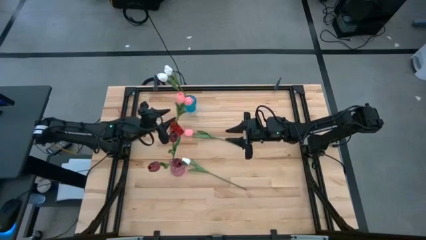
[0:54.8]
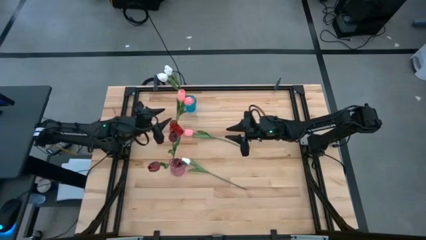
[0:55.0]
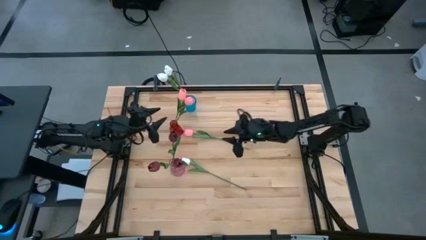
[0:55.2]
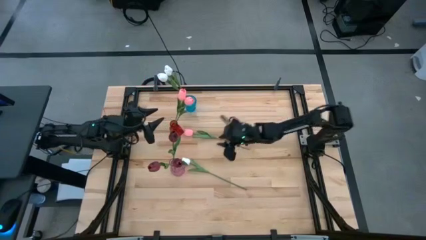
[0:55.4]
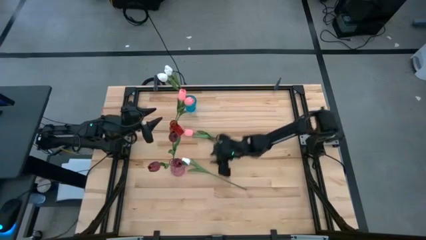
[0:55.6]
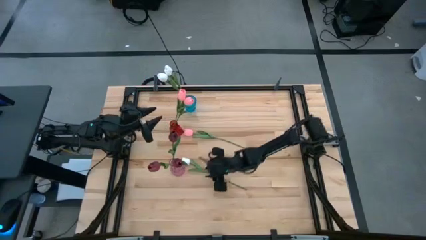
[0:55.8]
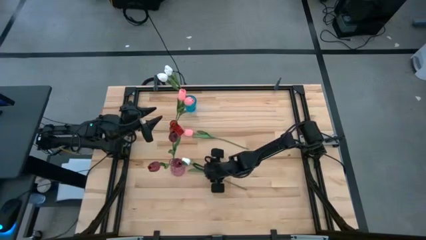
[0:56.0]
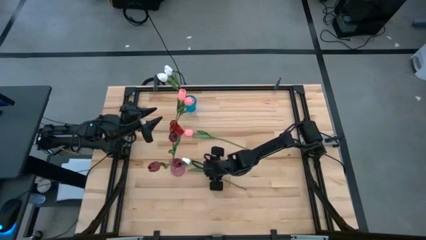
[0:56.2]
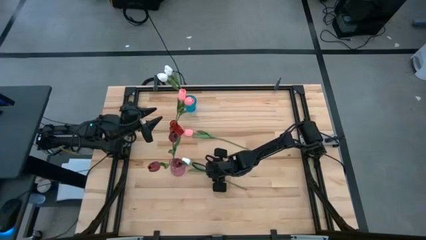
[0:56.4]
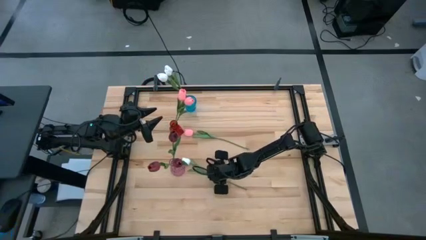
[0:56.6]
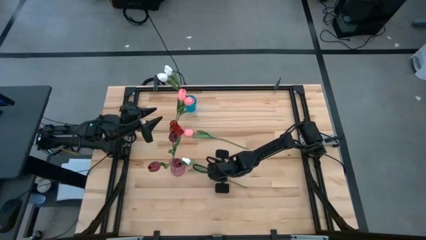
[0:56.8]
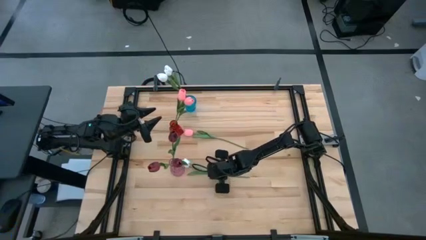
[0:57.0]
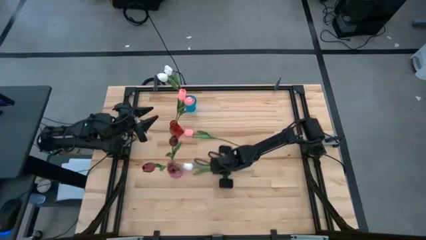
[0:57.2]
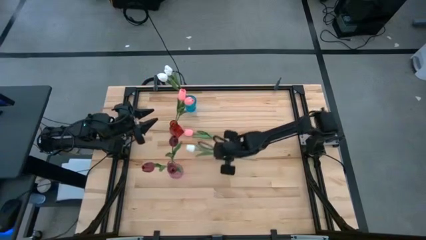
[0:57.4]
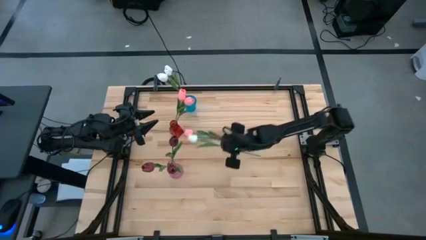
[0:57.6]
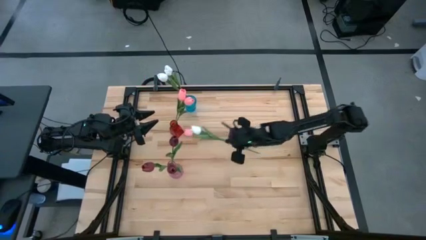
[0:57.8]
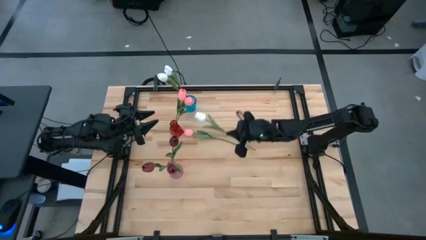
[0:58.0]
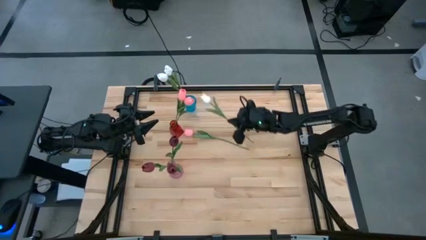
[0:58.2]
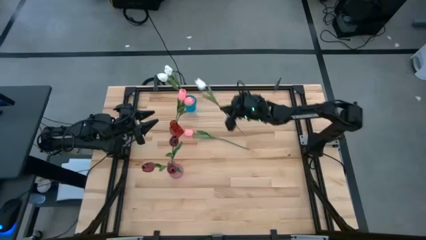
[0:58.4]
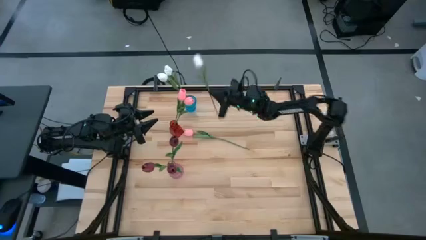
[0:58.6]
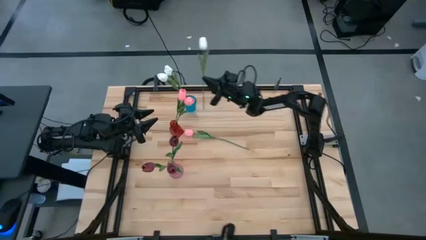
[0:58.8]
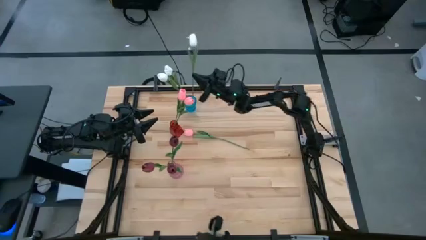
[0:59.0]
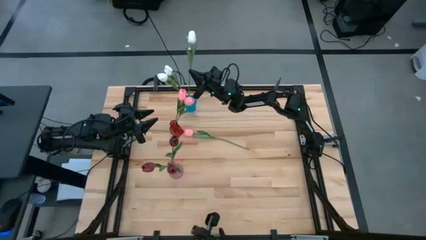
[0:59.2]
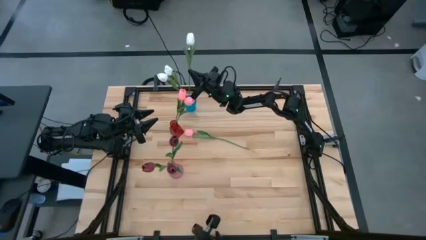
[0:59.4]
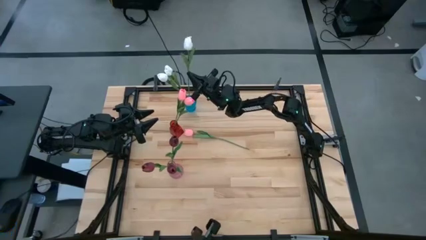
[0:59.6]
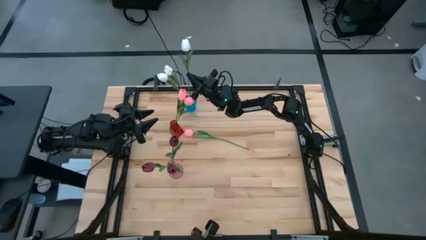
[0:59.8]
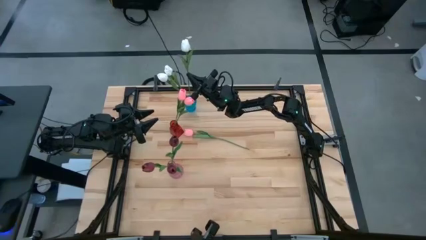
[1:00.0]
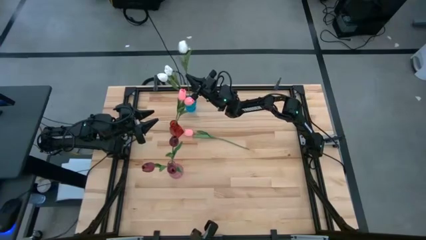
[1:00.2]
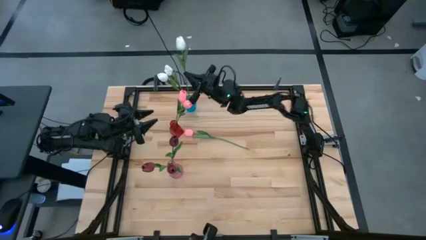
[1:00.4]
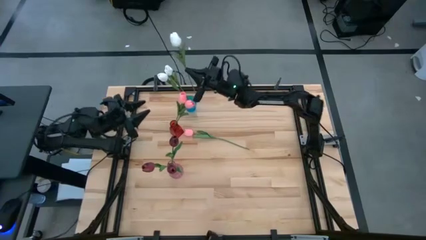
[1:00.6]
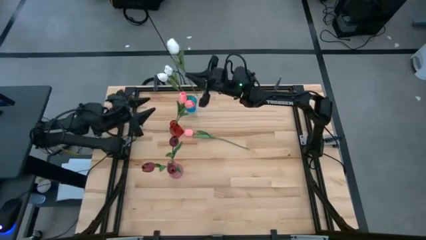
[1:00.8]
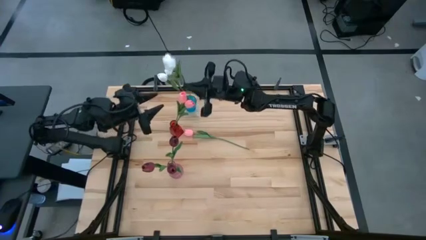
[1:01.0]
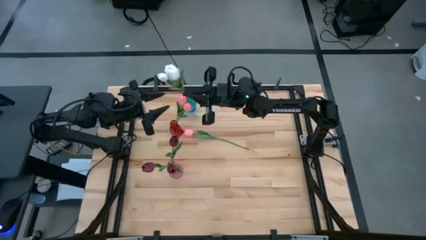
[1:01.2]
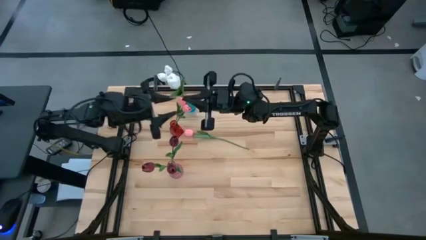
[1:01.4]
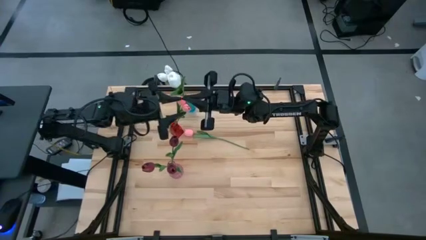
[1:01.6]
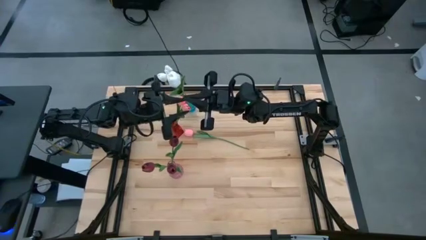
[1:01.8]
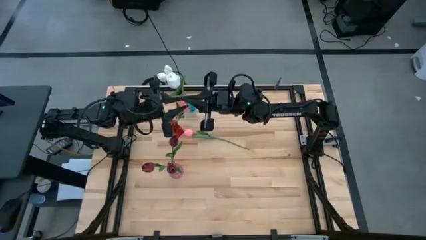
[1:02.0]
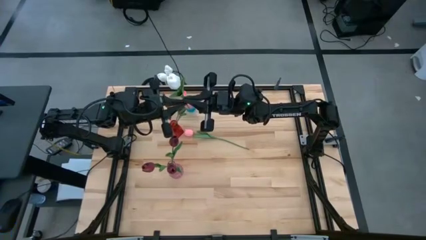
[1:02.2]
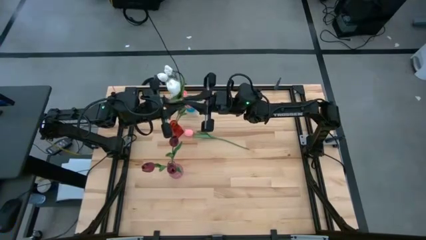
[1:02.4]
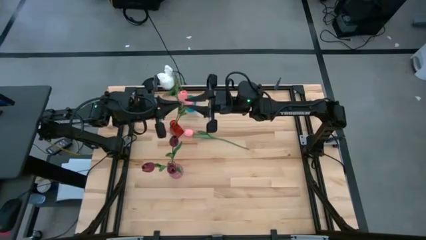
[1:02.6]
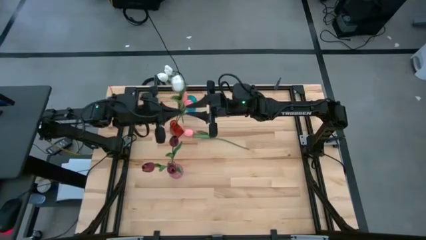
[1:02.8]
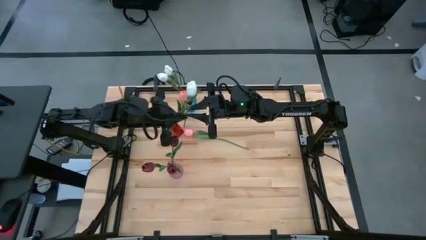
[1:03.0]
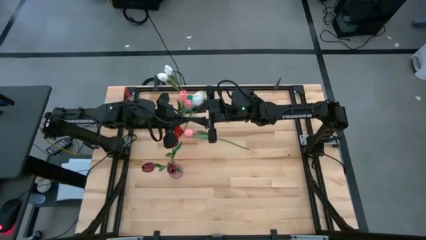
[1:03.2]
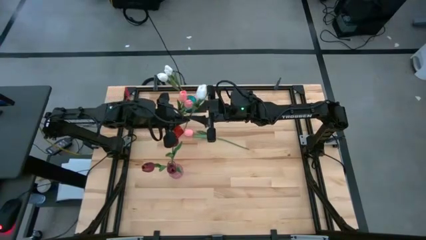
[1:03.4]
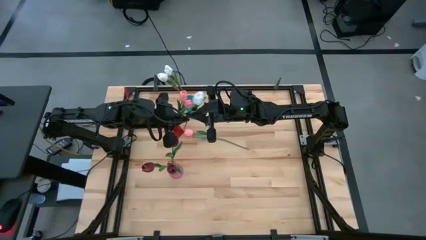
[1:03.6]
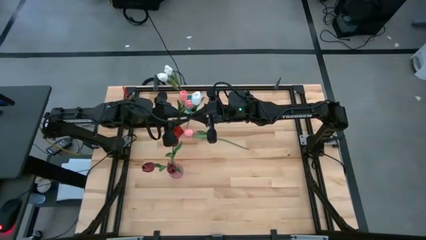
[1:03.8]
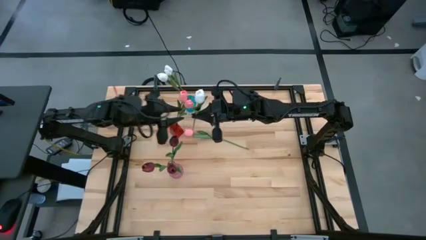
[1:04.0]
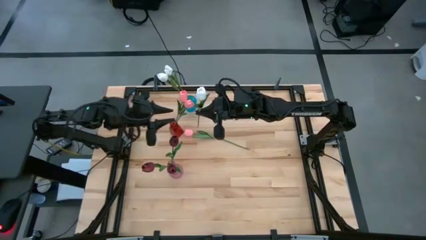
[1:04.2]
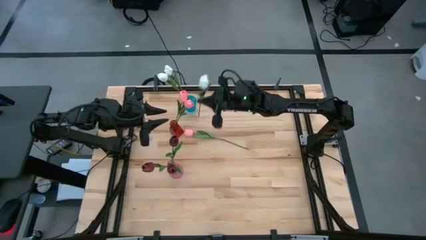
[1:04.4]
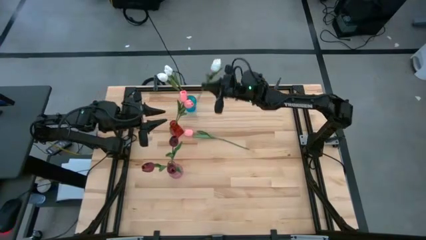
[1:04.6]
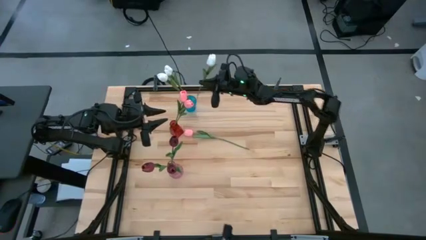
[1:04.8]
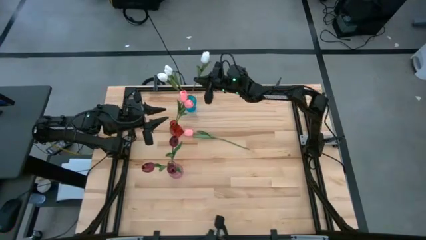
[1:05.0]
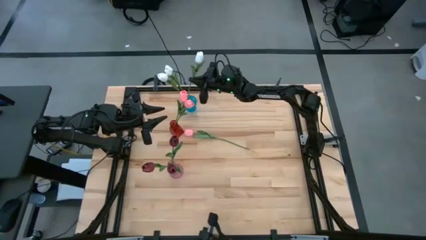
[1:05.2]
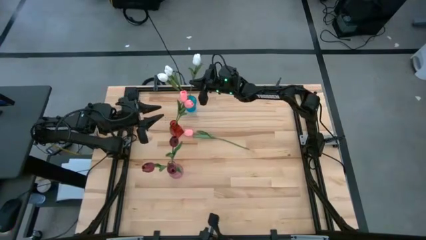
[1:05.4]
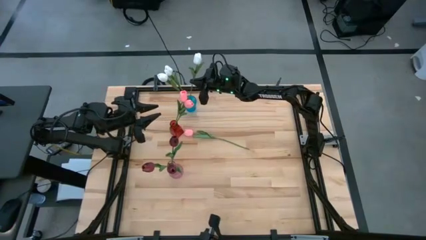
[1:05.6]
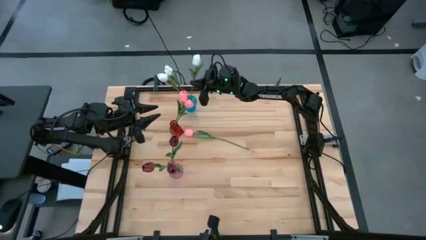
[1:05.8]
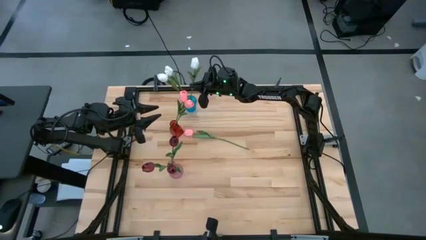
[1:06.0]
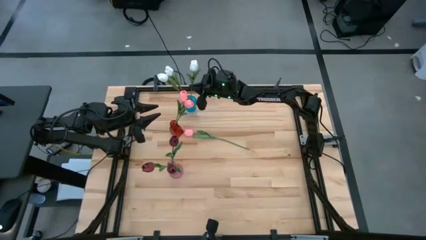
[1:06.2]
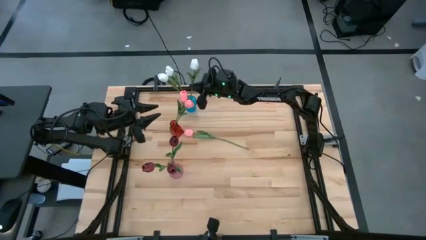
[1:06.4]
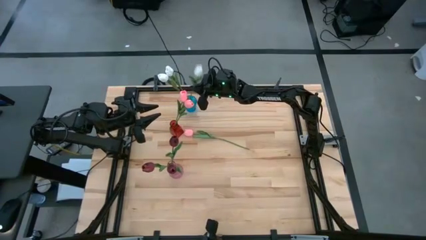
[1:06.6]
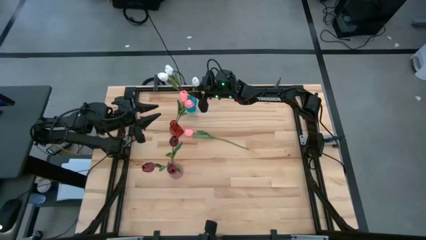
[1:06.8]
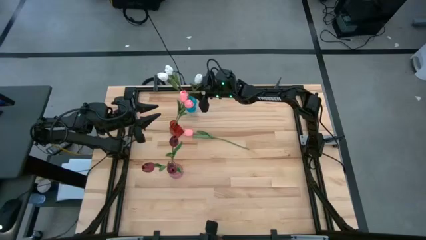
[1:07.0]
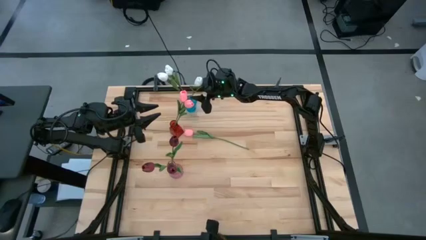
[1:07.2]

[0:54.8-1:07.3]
Task: Sort flowers into vase by color
Put the white tulip into the blue vase

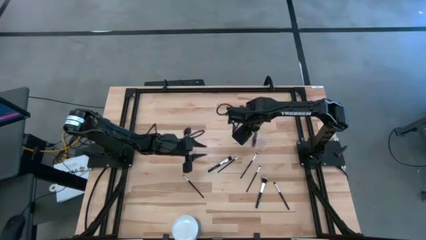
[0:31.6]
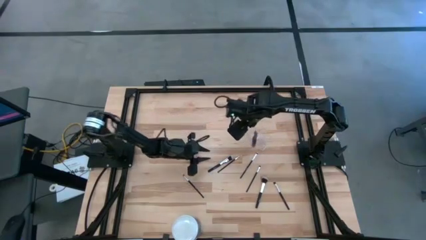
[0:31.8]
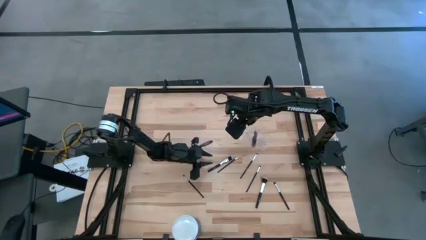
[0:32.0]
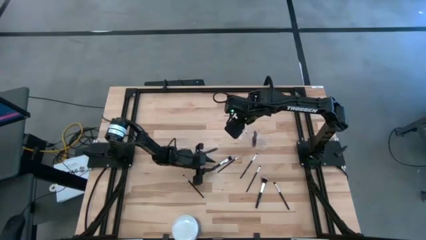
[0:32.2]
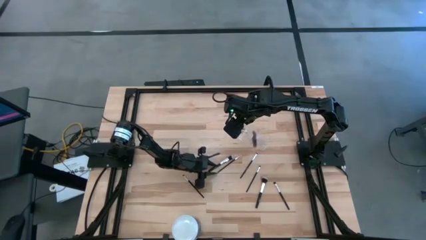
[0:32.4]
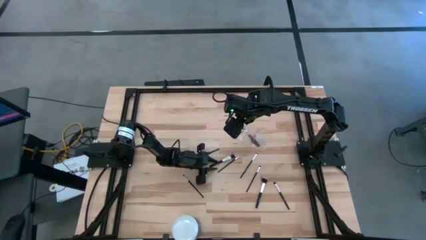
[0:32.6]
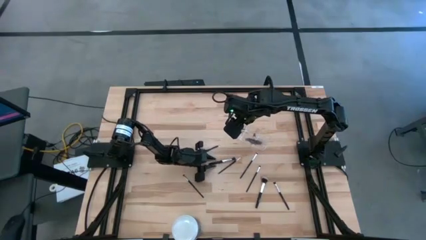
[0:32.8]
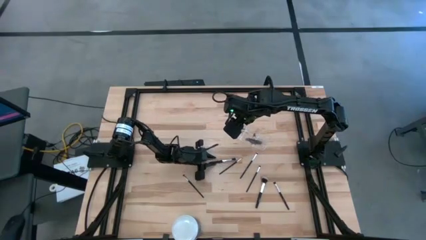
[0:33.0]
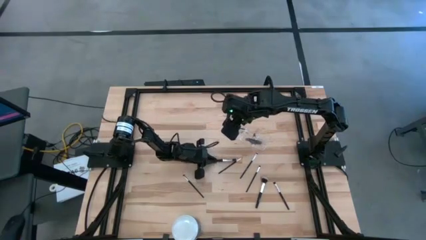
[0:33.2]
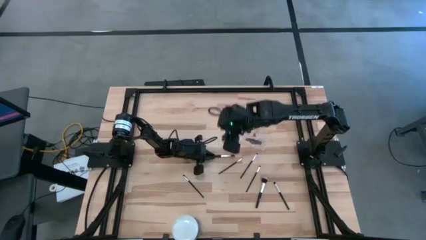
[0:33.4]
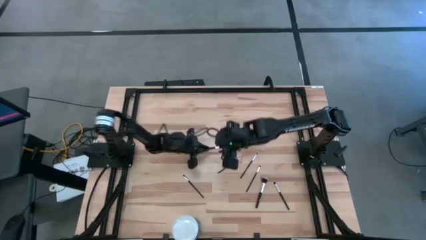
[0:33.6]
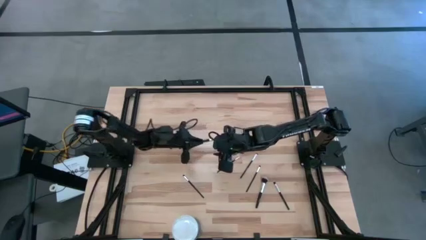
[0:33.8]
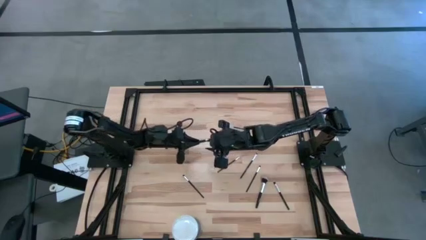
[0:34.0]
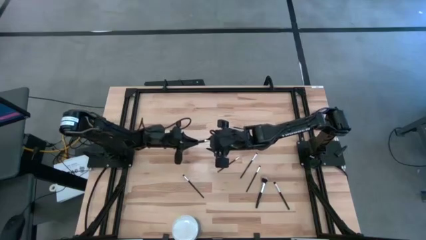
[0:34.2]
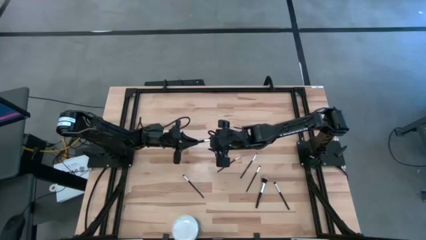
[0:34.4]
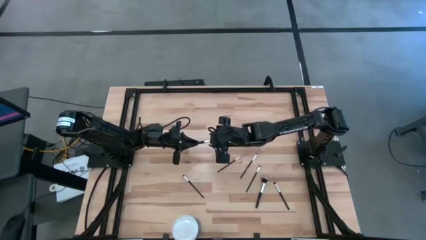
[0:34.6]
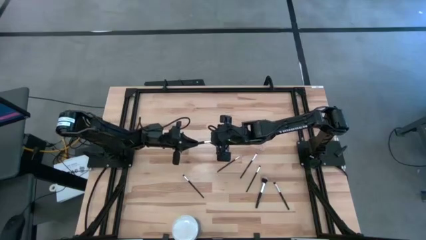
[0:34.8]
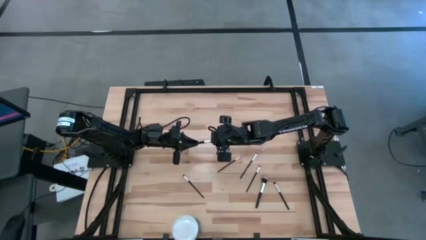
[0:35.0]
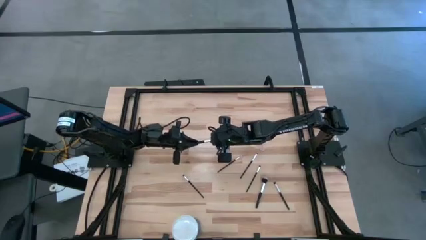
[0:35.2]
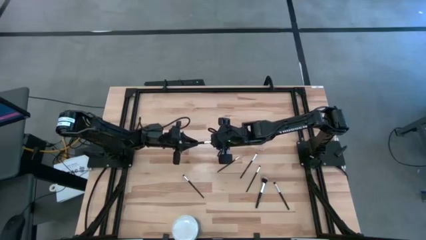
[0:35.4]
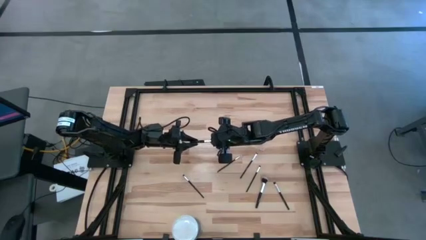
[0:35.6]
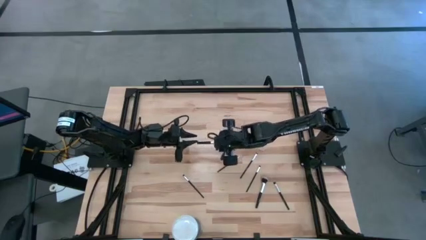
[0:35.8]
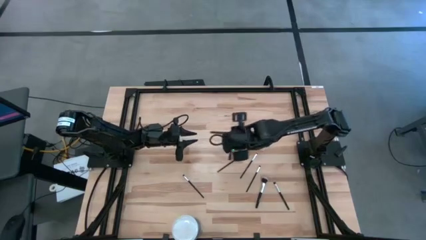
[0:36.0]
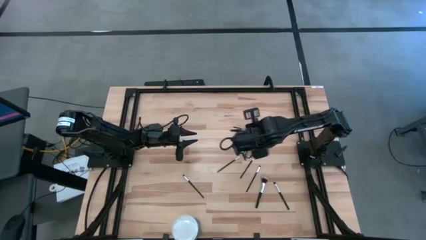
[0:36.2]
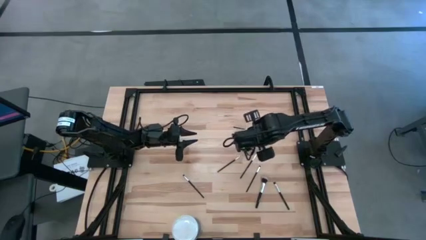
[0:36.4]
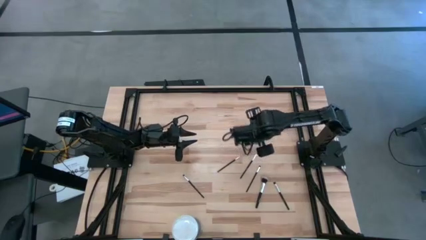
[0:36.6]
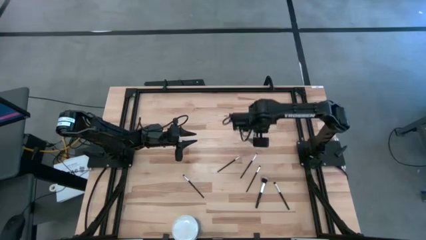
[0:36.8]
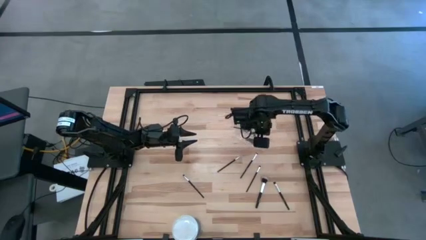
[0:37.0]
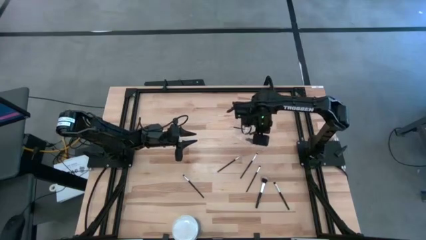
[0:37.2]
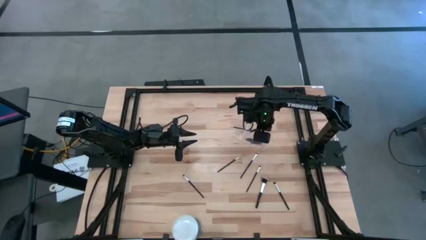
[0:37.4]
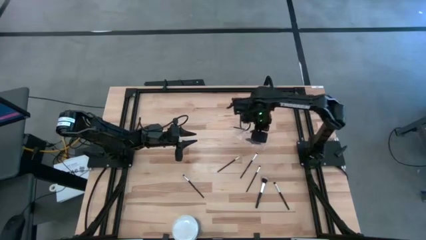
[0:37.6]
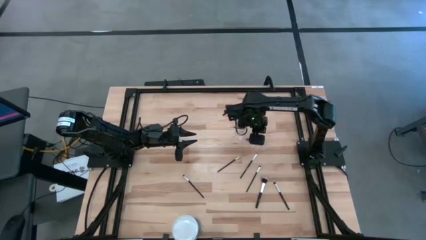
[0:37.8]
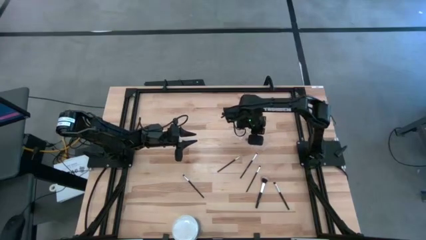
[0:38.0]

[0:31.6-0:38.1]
Task: Pick & Place Makeup Brushes
Put the black blush brush into the makeup organizer
